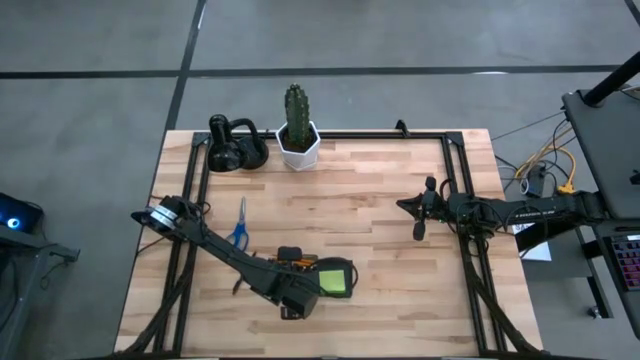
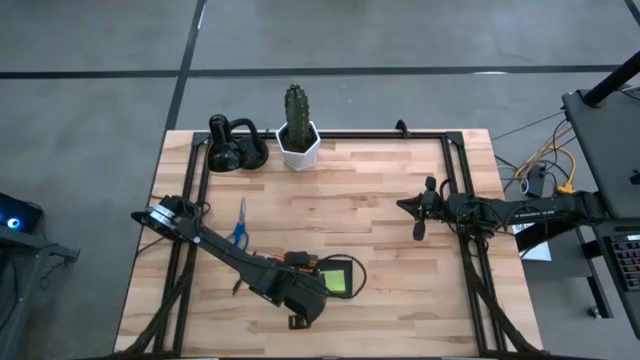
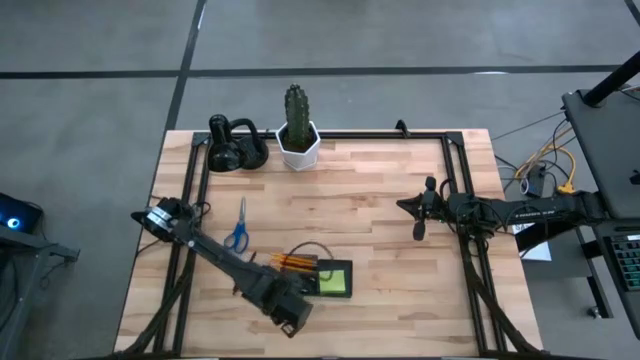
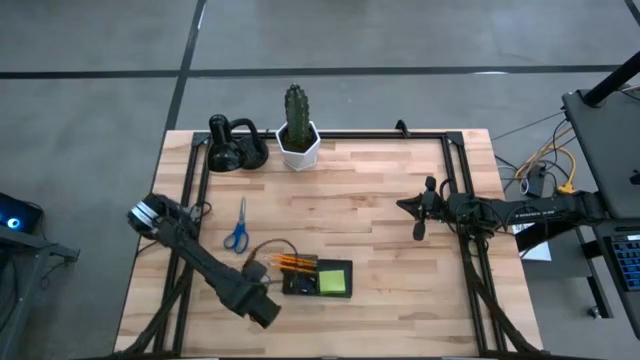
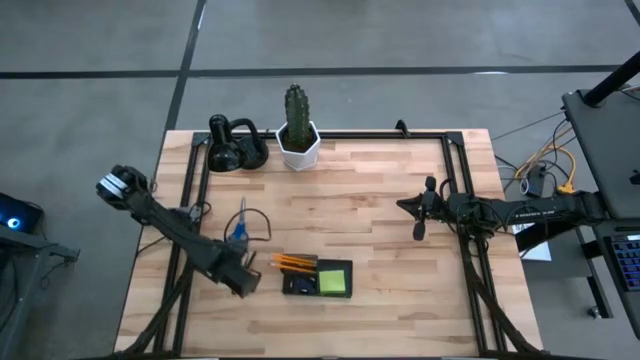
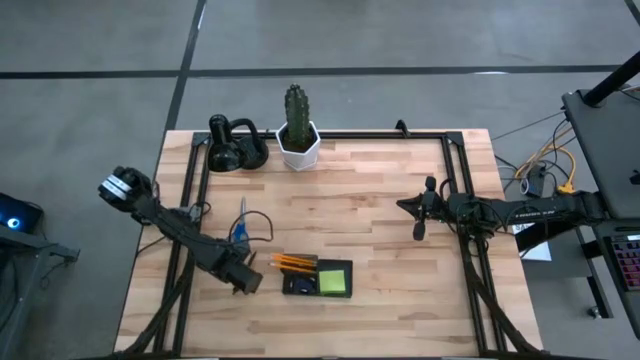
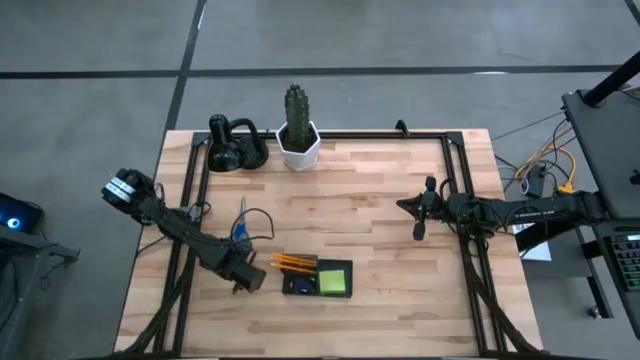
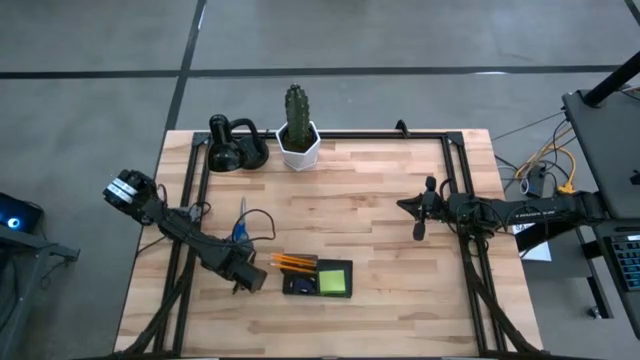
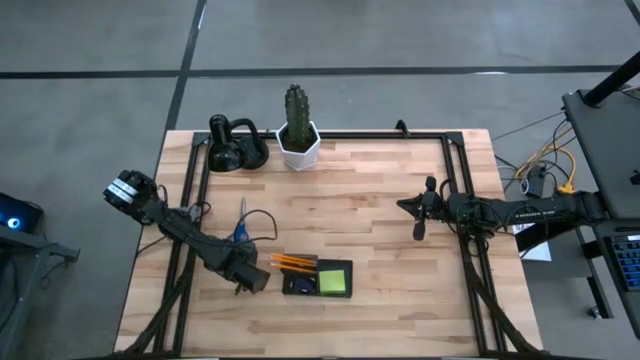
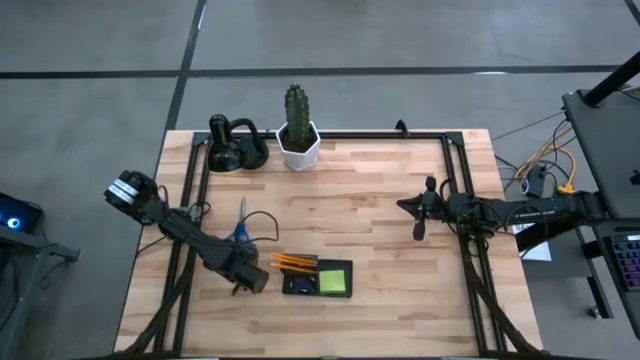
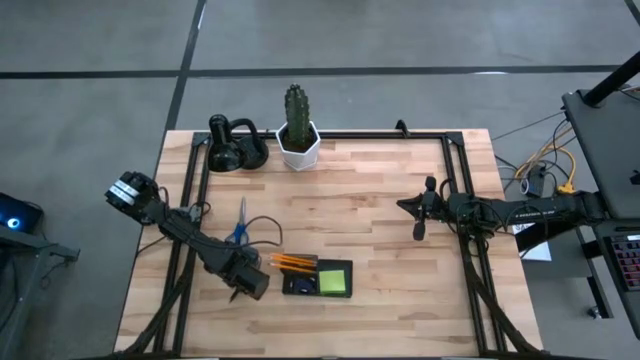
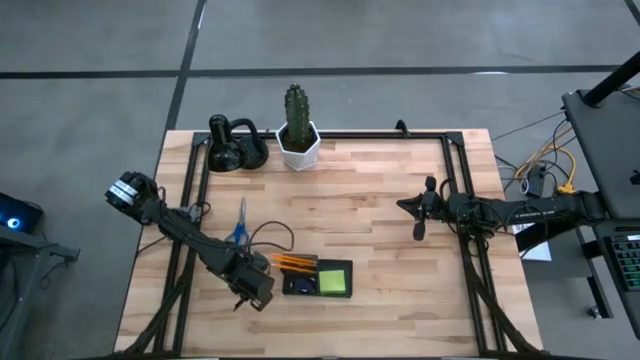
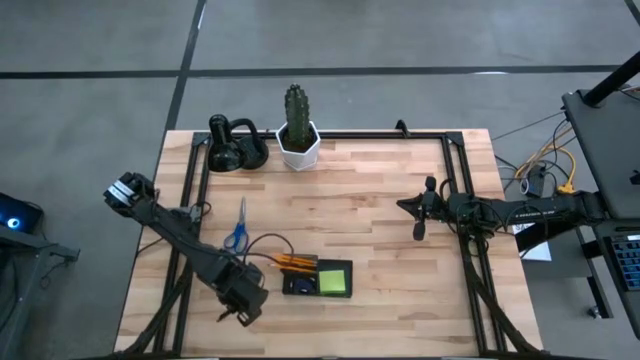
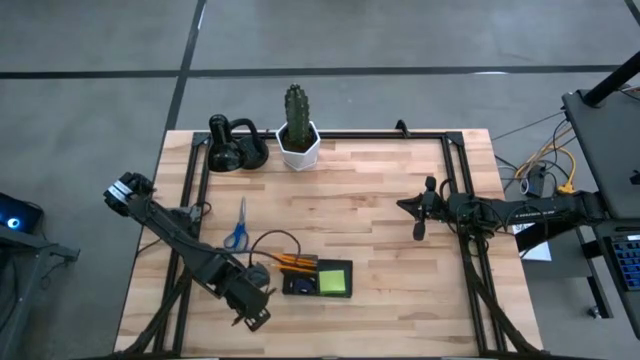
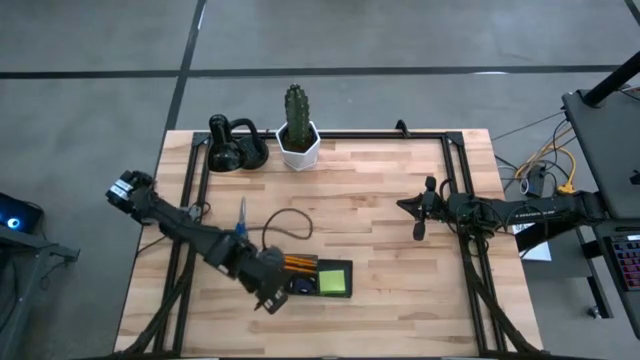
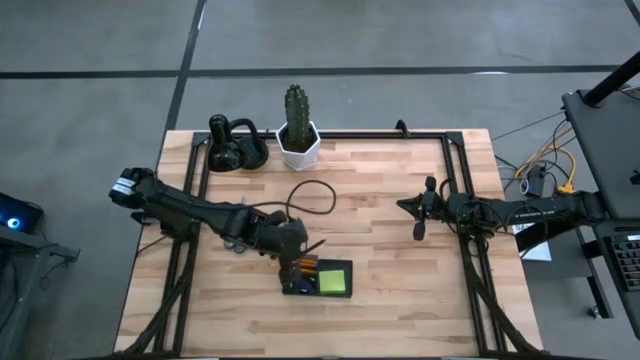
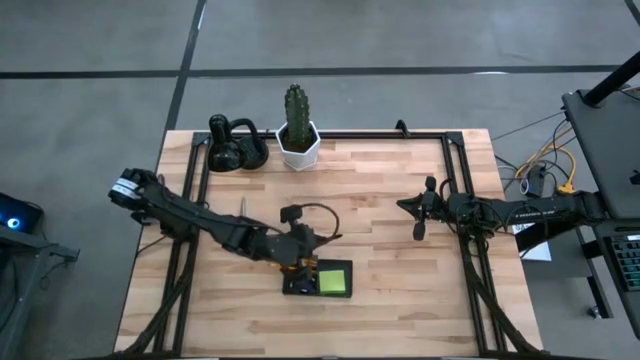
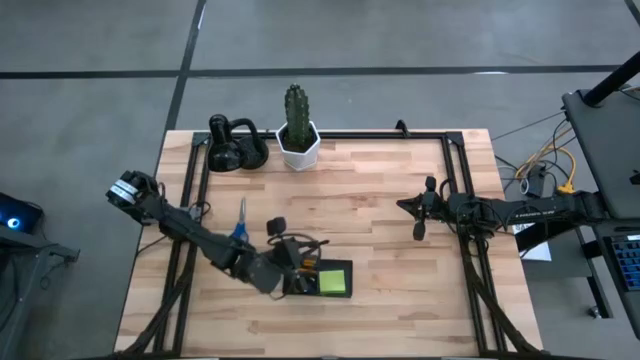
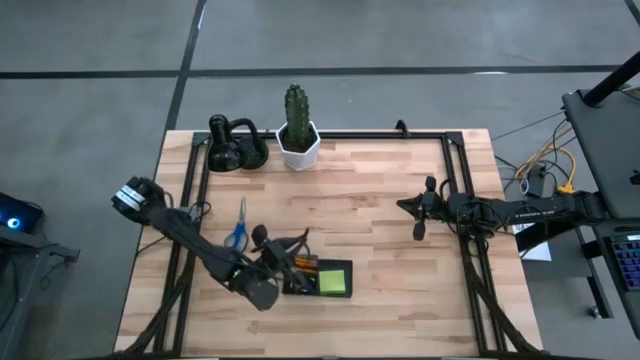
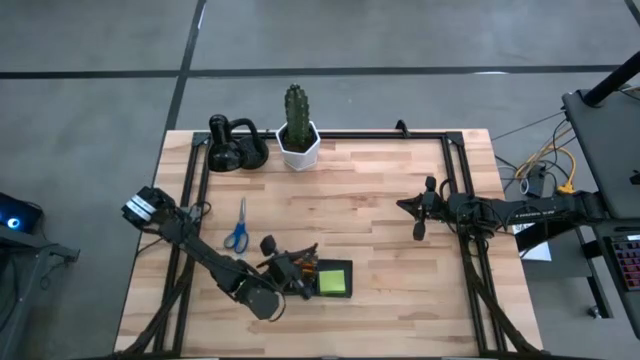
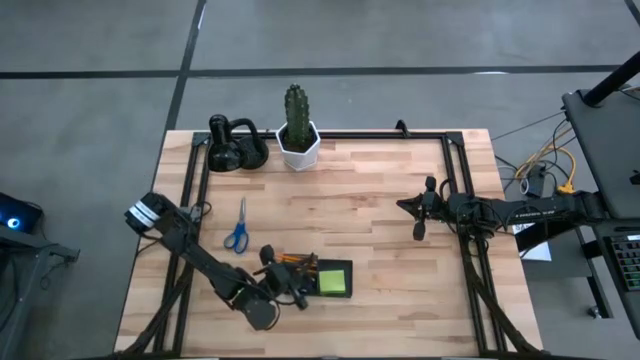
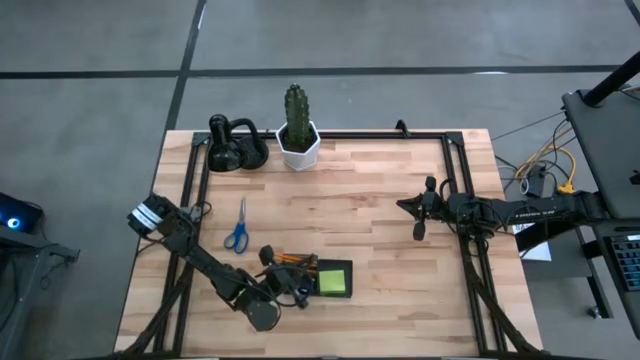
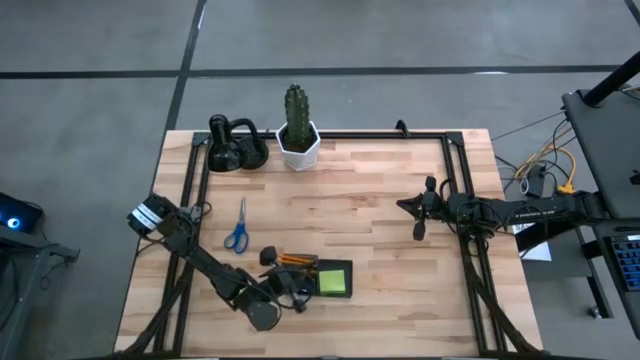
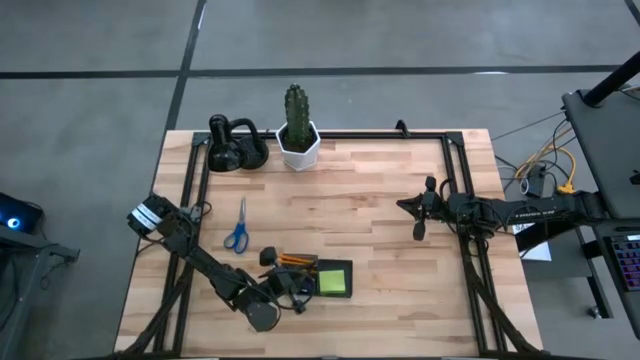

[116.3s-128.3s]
Task: Pick and place office supplies into organizer
Put the black pen into the desk organizer

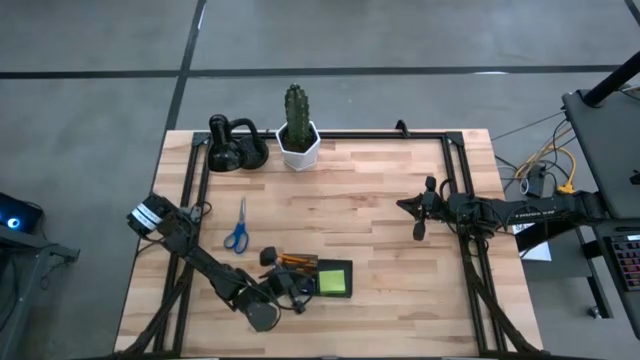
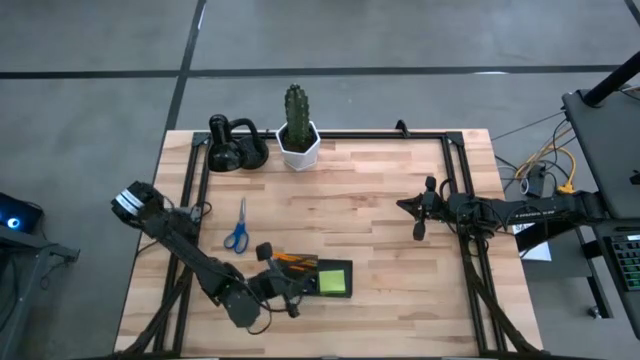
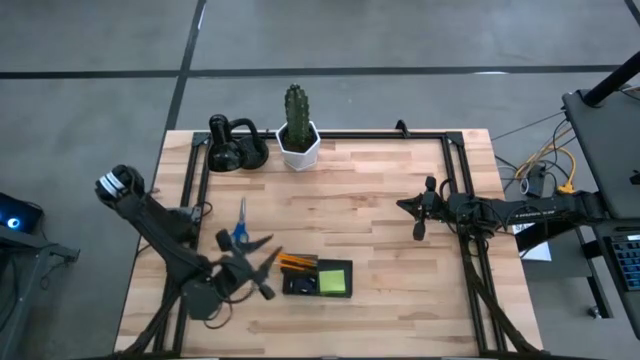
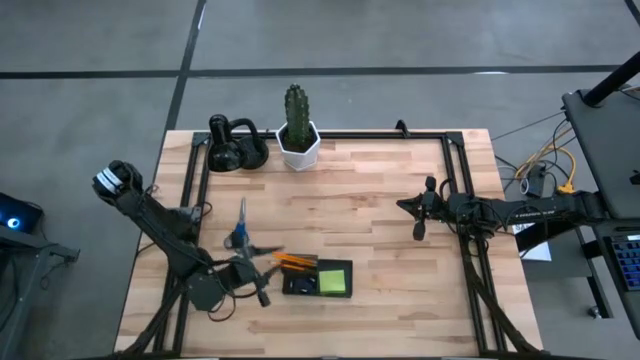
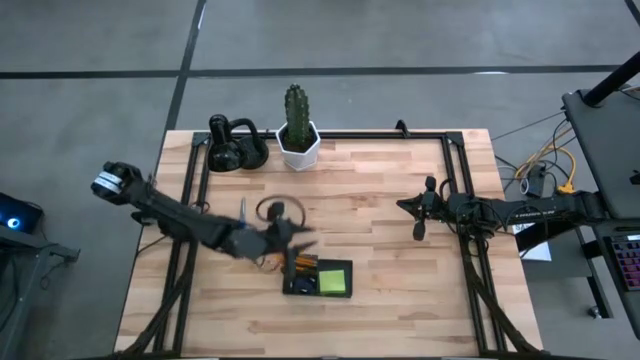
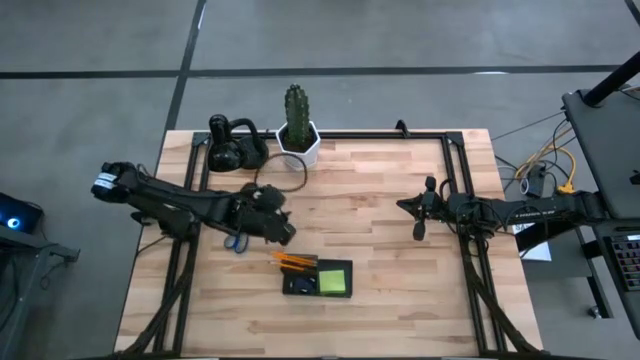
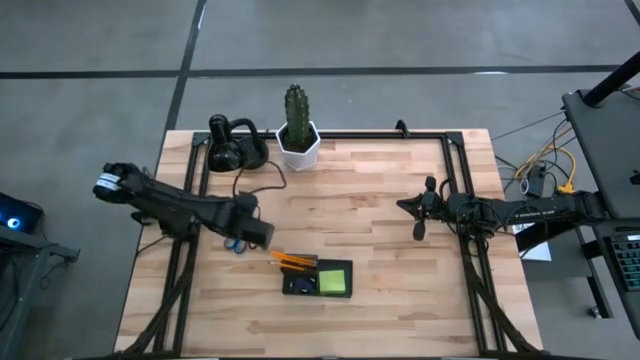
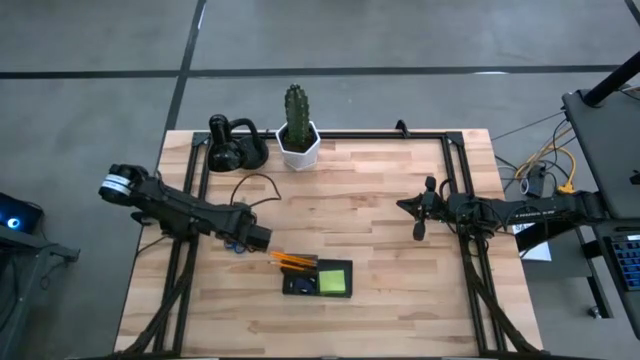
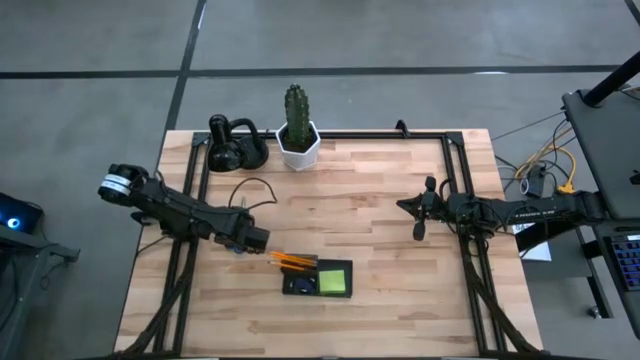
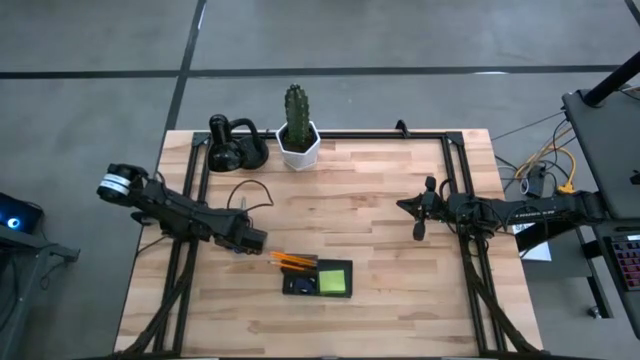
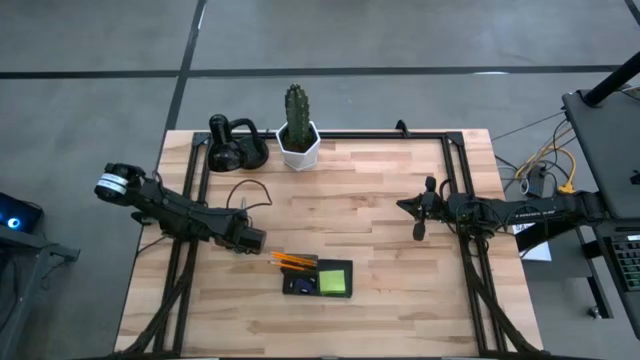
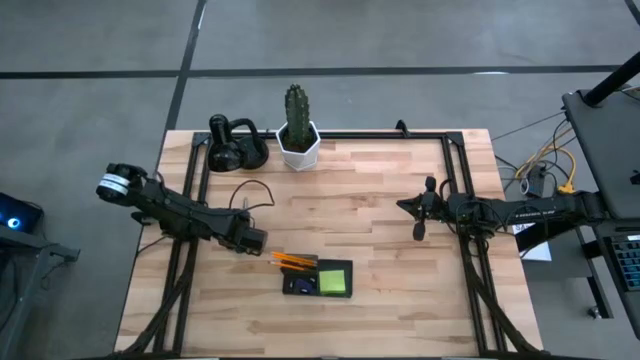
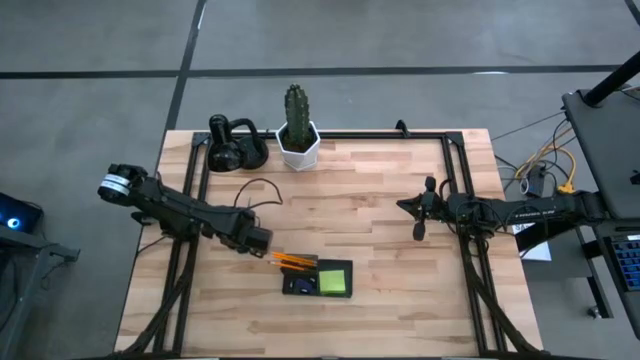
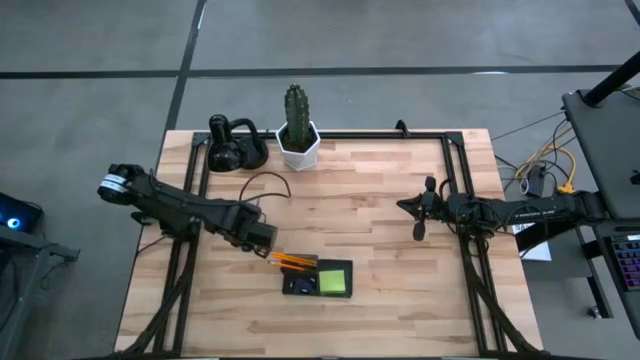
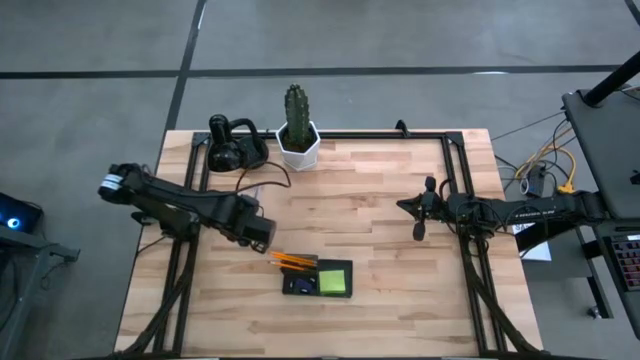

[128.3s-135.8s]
Put the blue scissor into the desk organizer

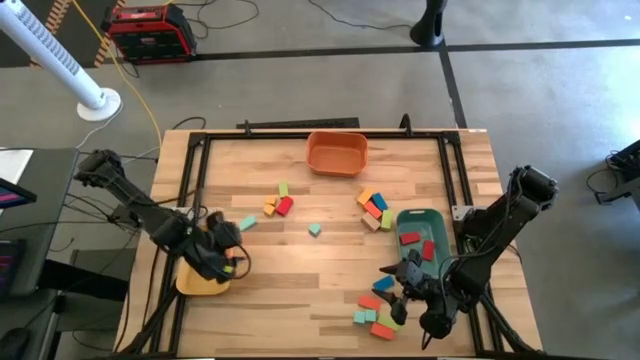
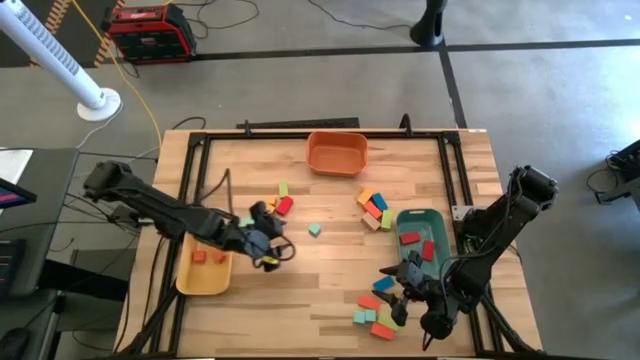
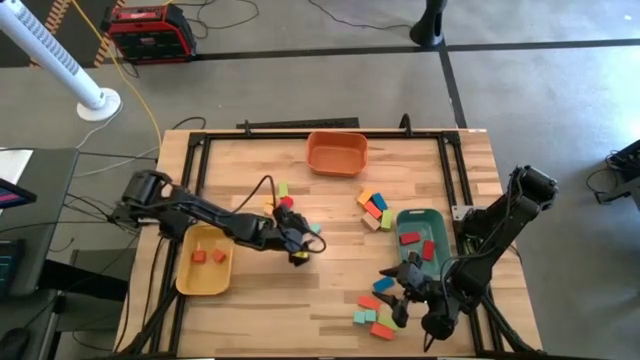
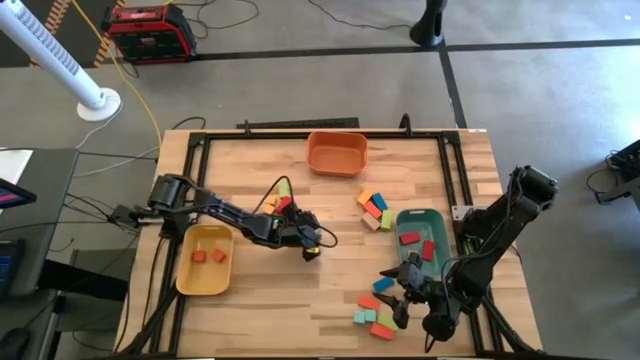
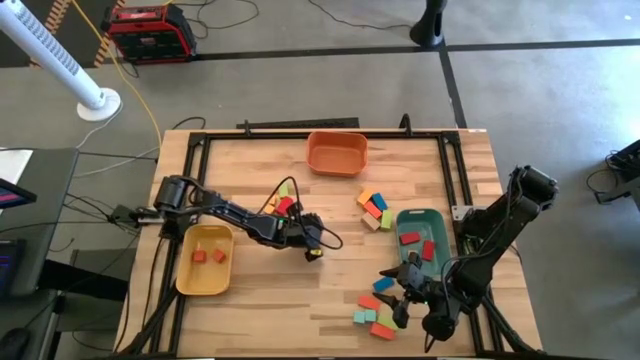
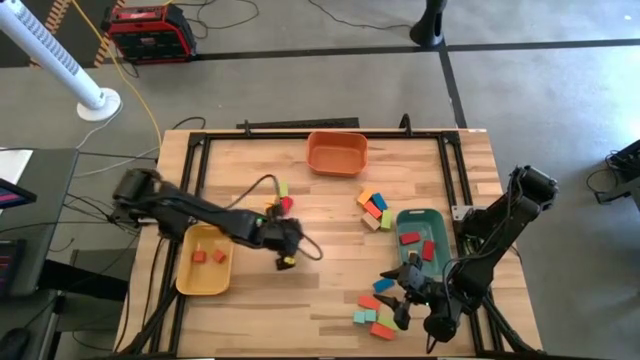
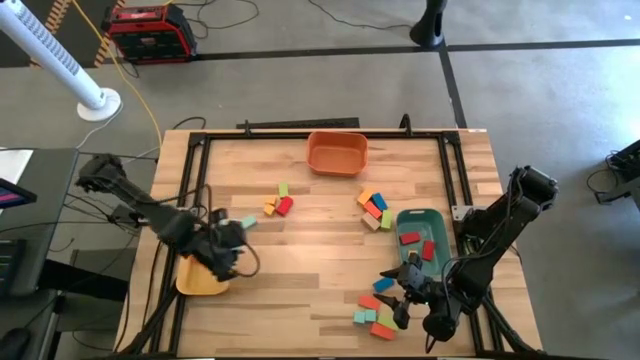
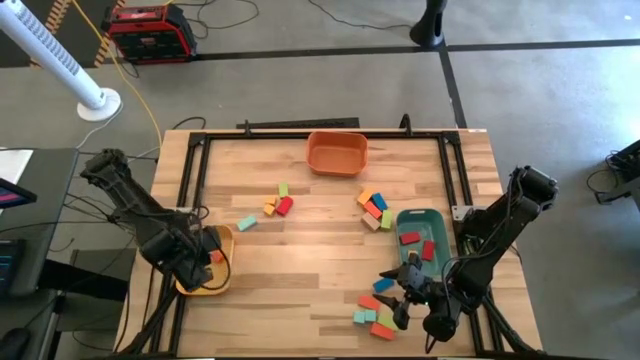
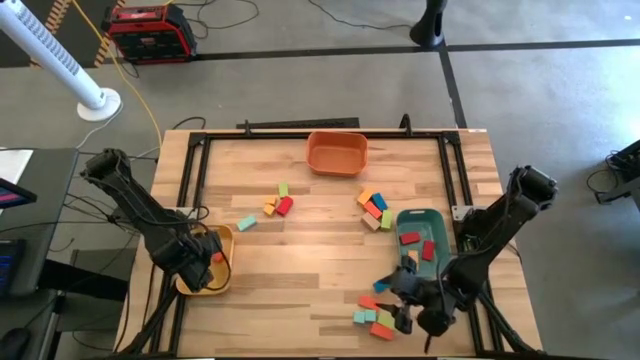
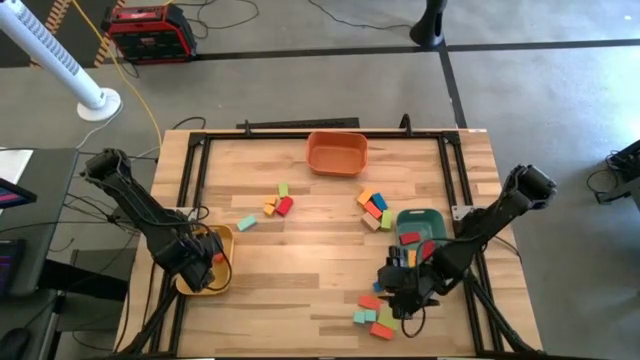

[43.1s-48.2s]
Task: Sort blocks by size
Put the small light blue block into the yellow bin
